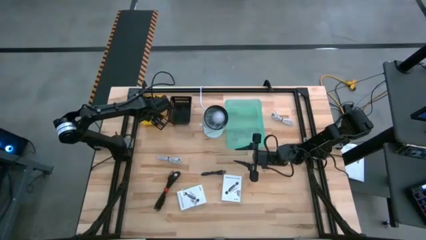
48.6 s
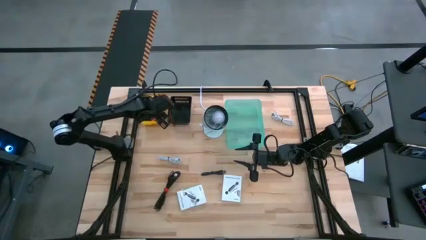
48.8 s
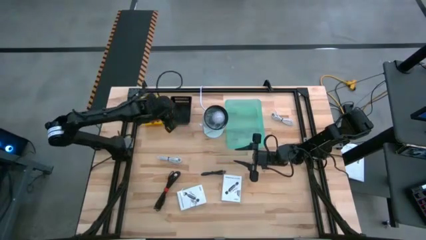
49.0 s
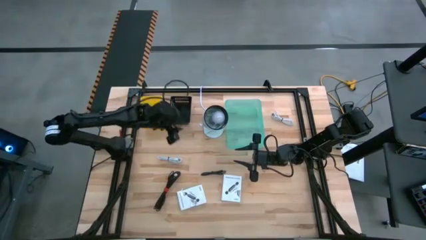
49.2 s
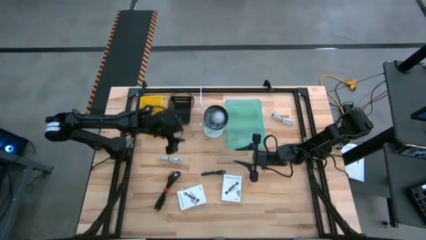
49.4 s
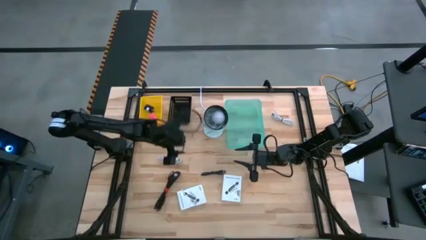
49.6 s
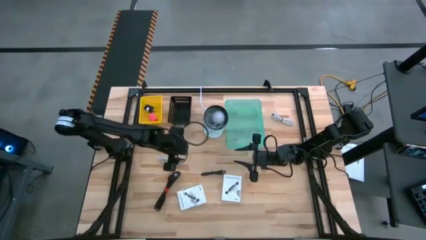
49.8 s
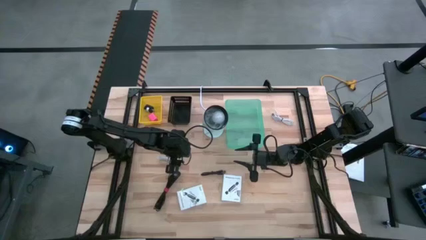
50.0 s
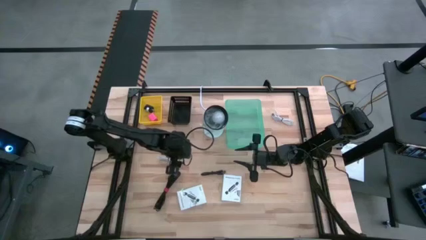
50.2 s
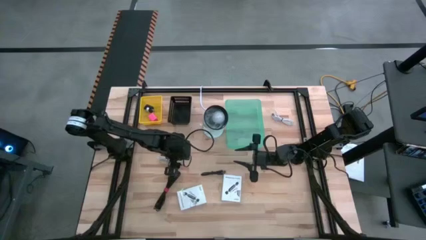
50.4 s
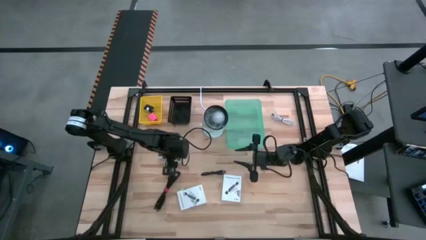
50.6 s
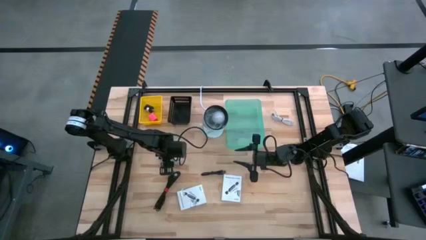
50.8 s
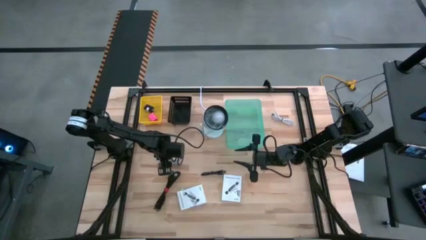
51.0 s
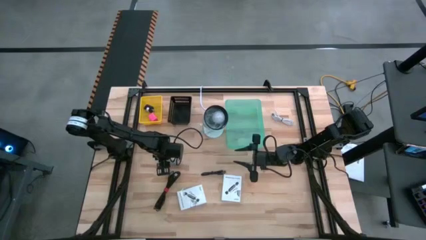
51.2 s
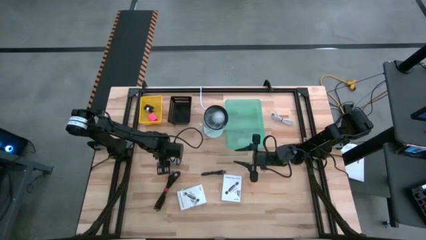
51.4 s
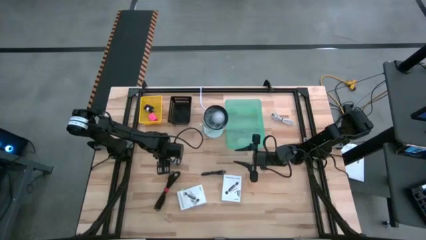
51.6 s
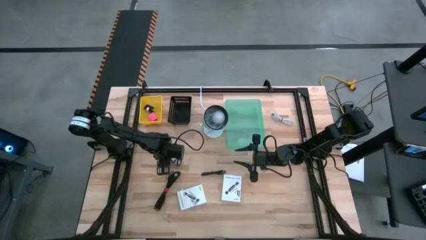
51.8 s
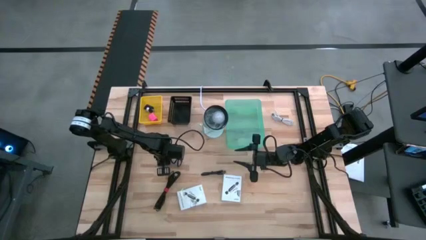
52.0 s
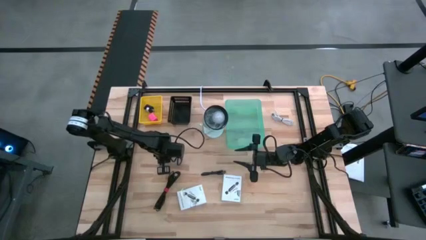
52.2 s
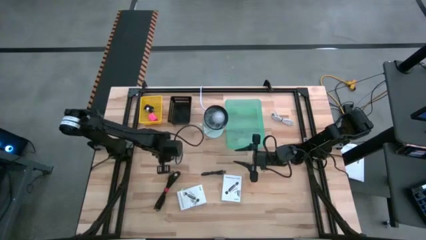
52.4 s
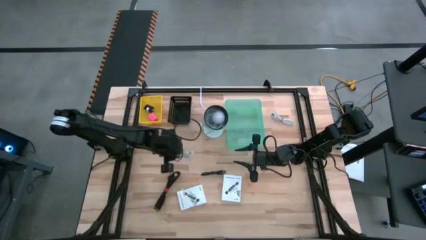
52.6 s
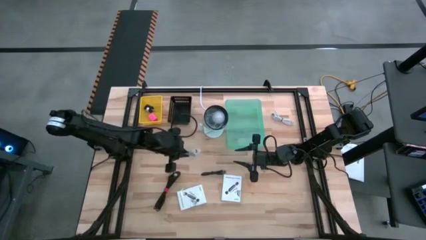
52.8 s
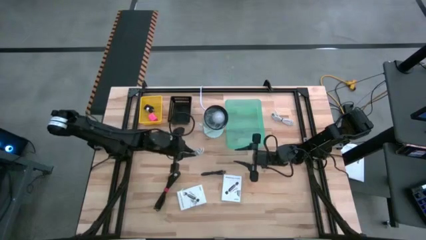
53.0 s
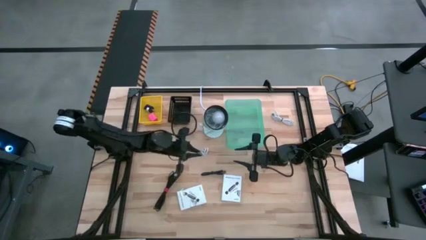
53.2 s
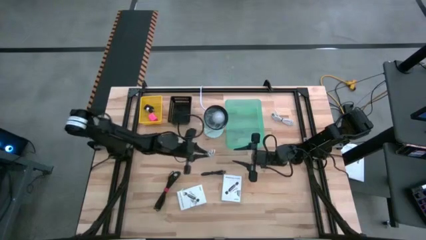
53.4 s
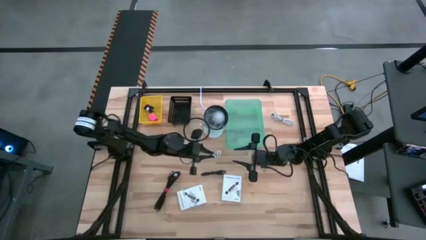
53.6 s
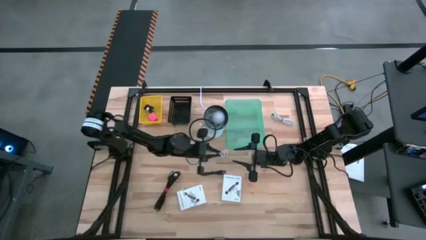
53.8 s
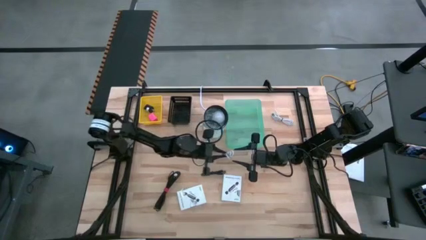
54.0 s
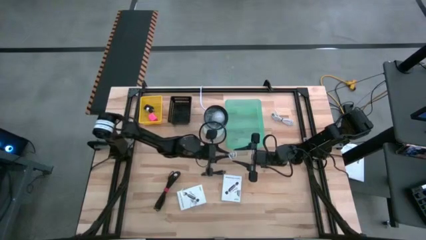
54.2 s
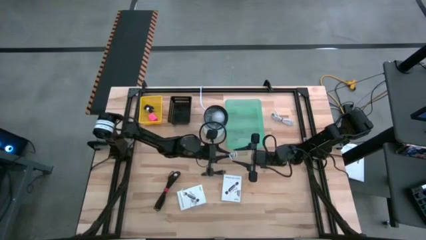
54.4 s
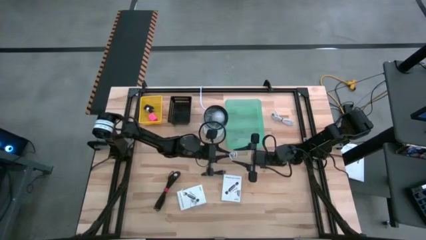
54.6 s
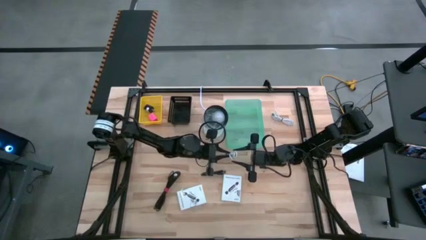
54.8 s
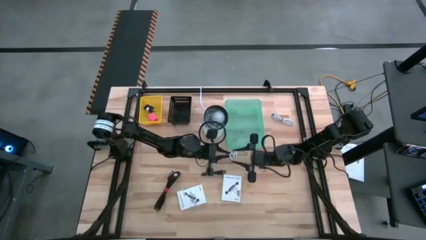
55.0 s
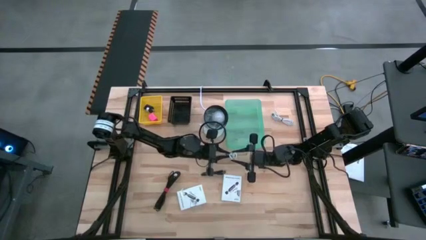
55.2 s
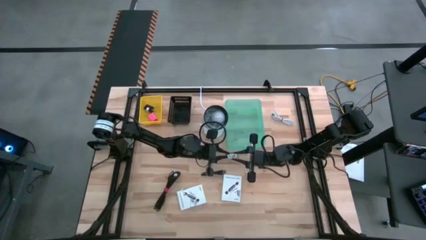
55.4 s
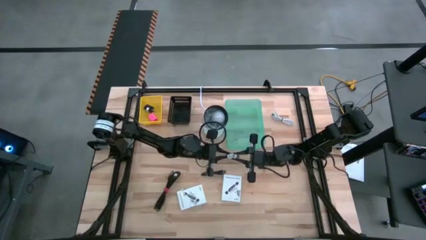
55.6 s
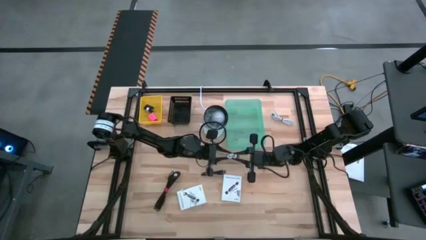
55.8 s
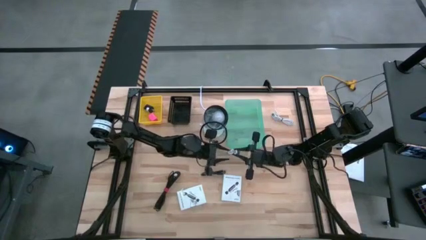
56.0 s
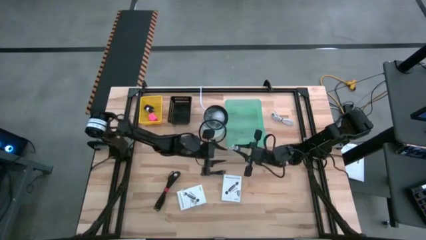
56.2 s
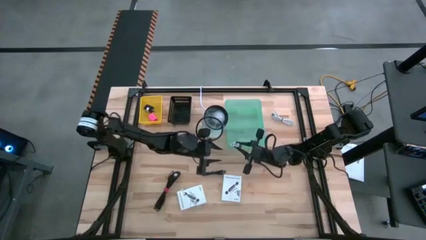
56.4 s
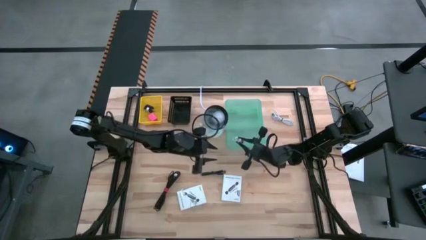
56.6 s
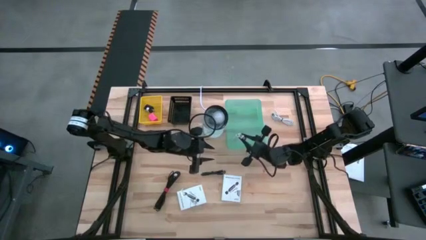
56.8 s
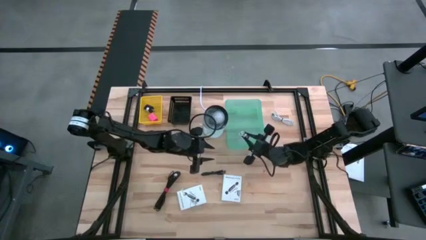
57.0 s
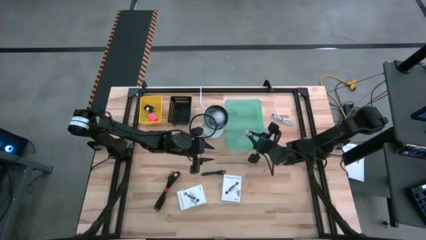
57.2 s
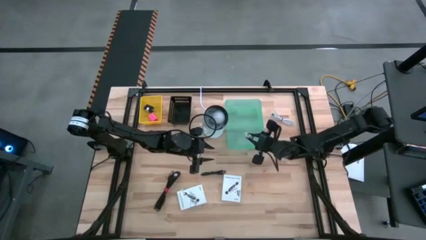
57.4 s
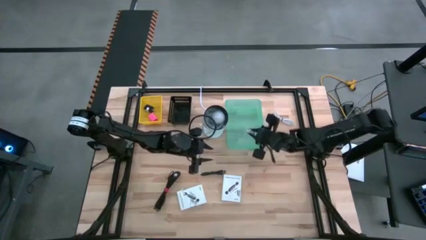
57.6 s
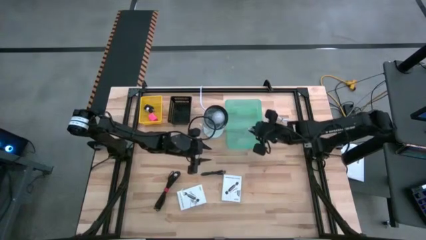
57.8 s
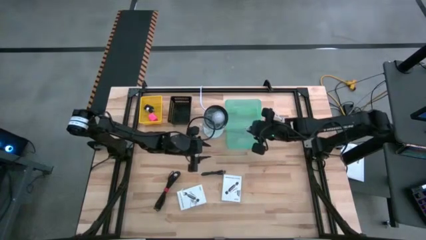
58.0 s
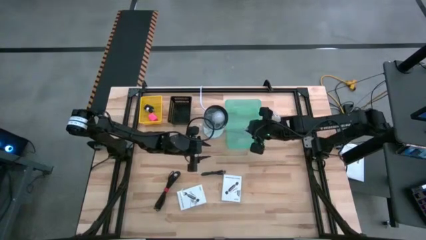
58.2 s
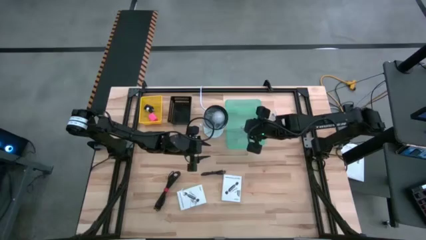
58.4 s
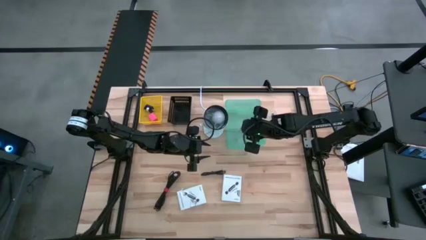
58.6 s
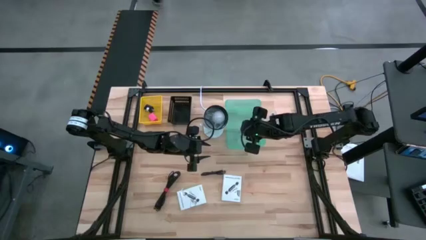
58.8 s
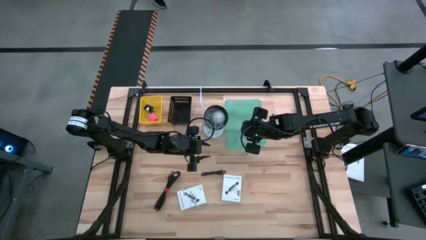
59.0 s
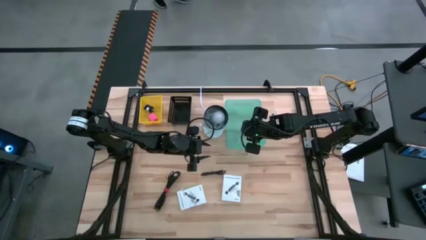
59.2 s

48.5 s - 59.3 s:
Task: Pick and place items into bin
Put the left white charger cable into the green bin

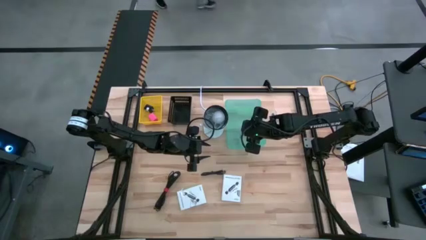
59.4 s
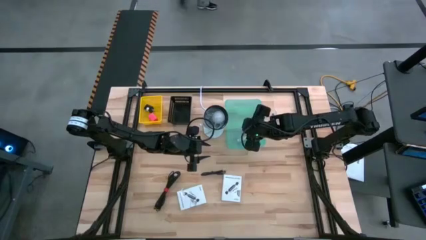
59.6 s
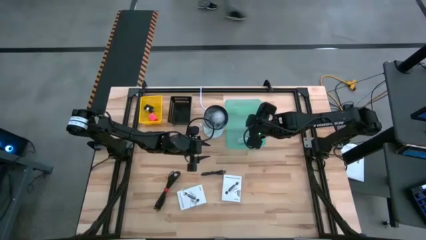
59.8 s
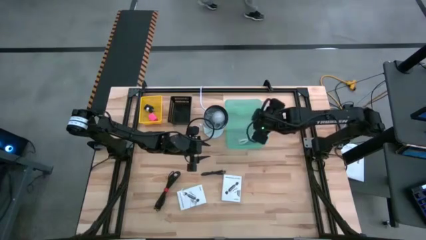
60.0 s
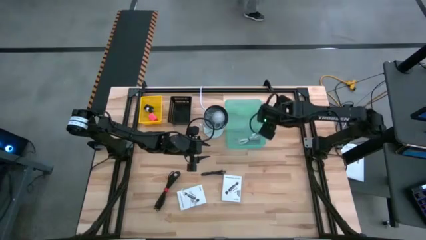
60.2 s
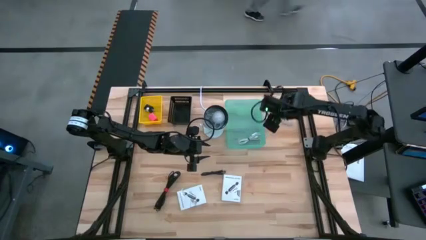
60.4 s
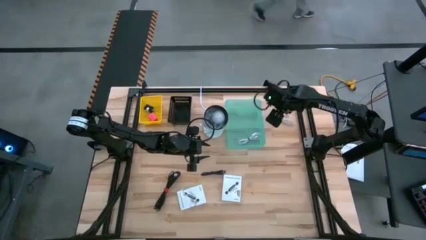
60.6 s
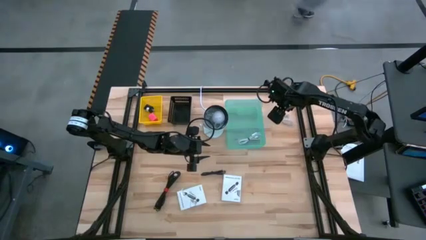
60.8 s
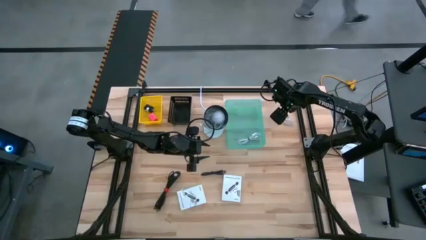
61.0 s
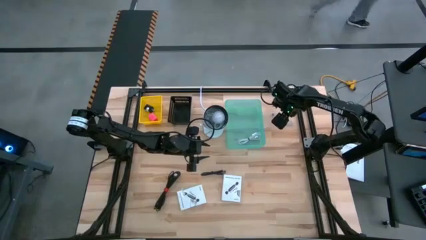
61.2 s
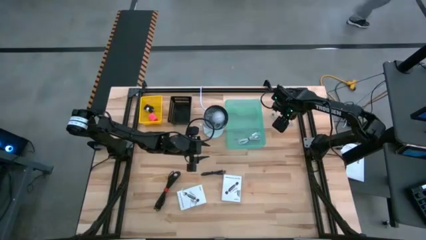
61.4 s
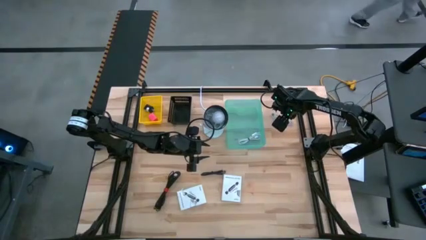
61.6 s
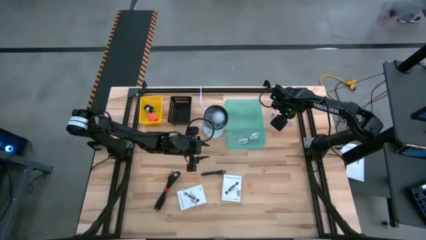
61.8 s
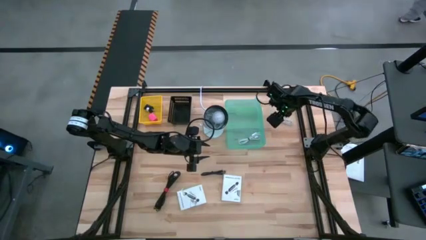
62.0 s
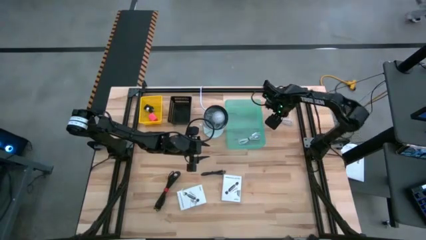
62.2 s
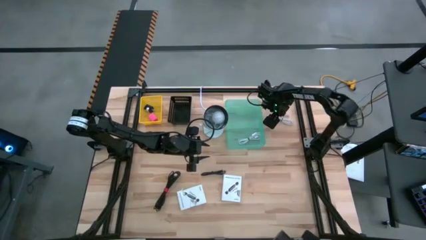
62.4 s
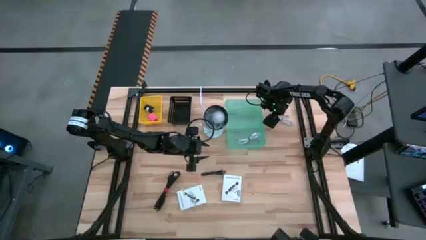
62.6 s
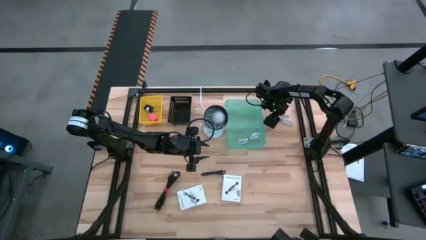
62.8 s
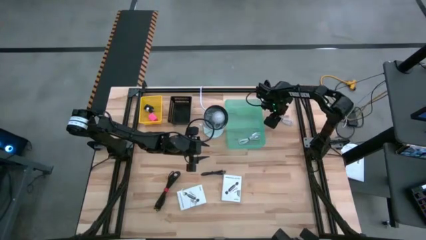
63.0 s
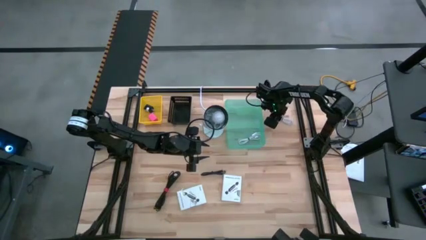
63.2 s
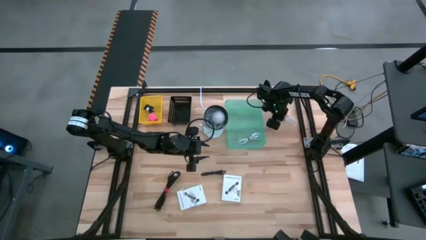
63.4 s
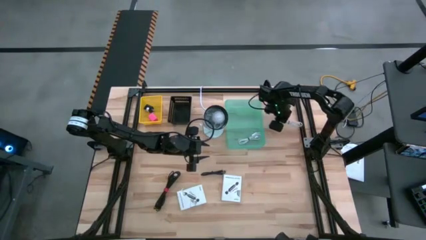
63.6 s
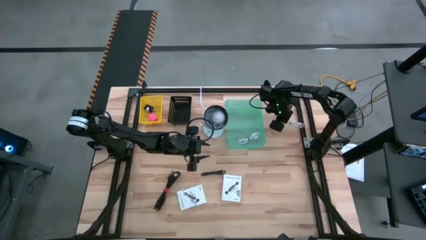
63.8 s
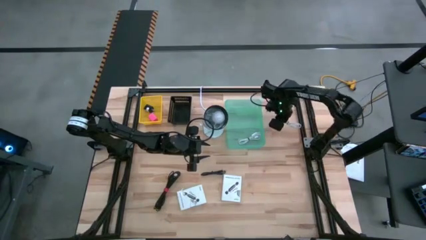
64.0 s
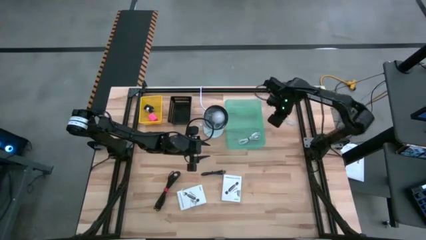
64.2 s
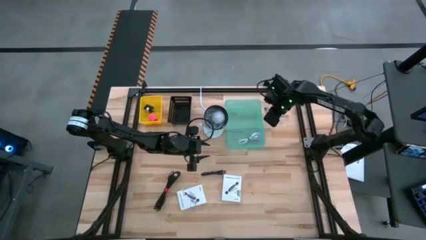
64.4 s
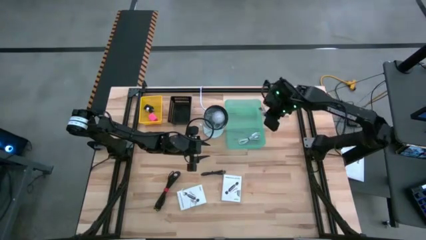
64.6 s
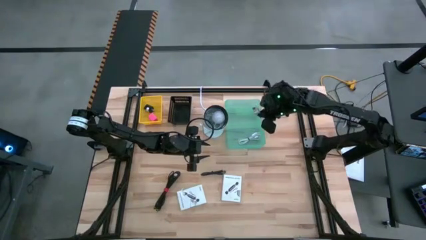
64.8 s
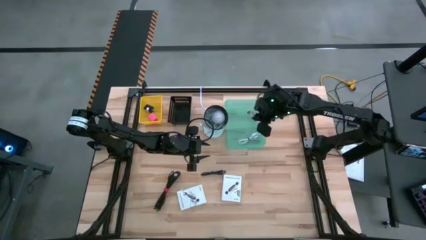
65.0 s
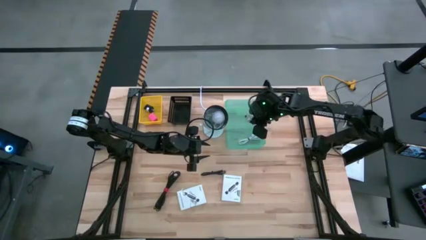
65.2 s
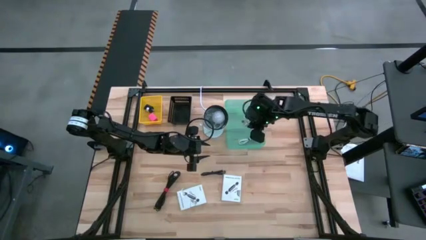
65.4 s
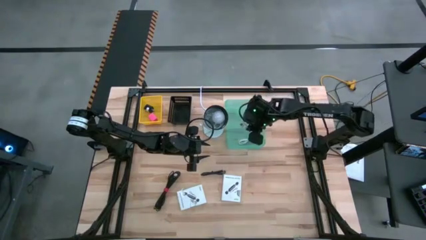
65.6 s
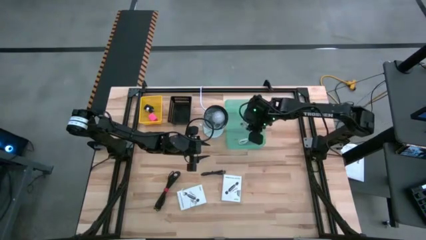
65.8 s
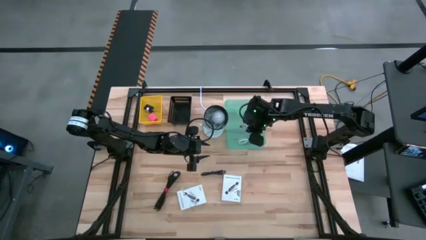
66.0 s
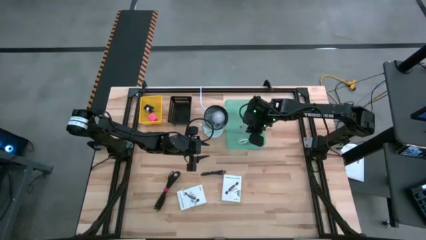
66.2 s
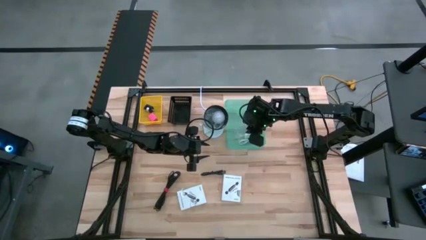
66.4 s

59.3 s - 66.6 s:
Put the white charger cable into the green bin
